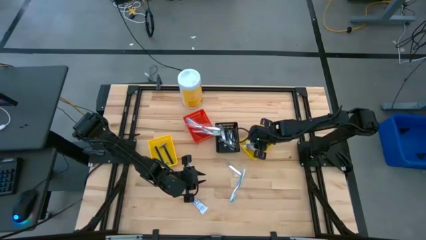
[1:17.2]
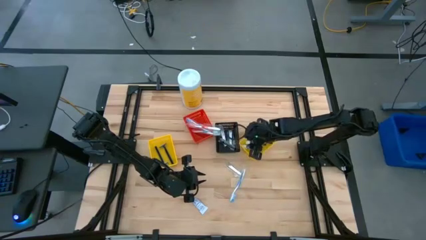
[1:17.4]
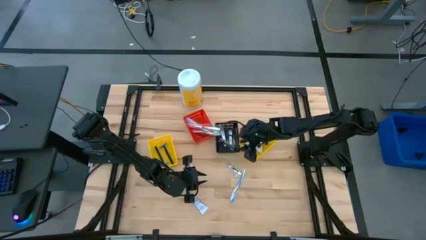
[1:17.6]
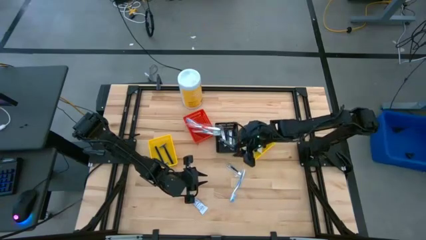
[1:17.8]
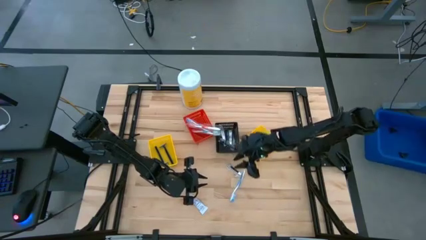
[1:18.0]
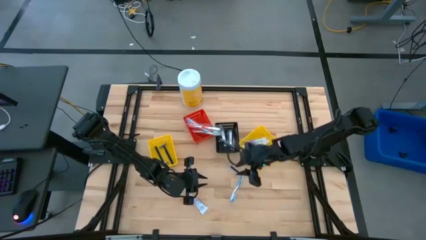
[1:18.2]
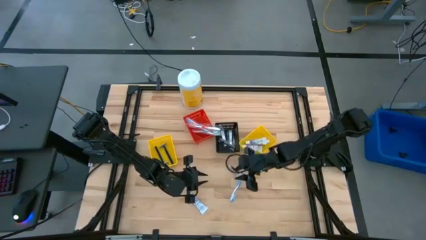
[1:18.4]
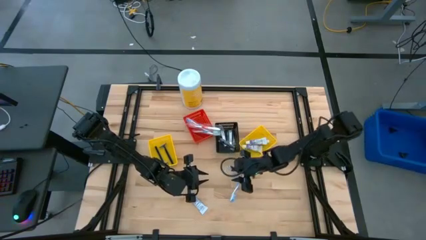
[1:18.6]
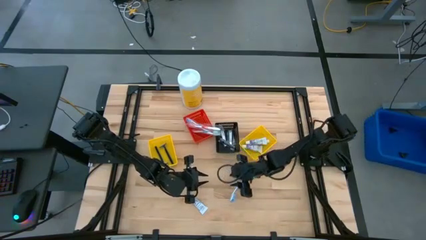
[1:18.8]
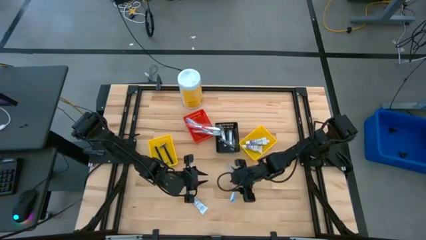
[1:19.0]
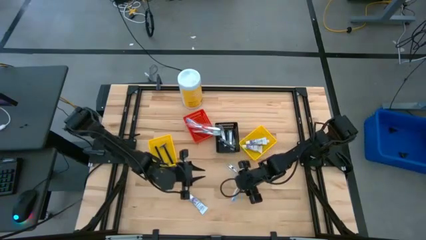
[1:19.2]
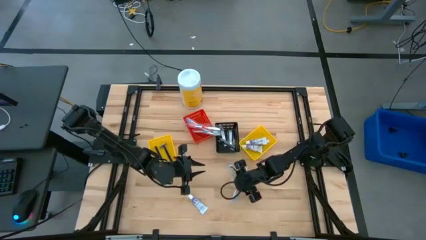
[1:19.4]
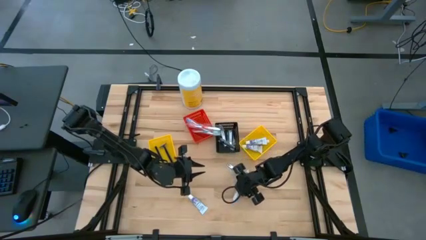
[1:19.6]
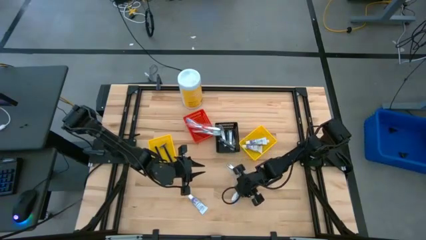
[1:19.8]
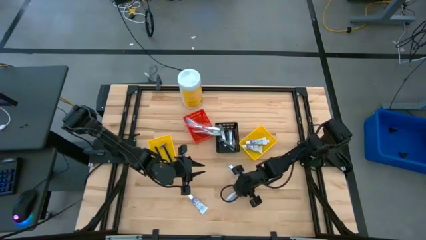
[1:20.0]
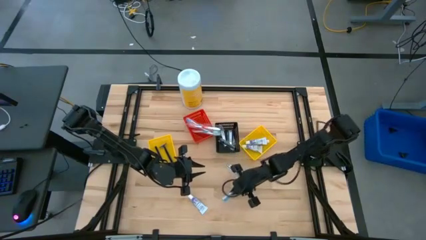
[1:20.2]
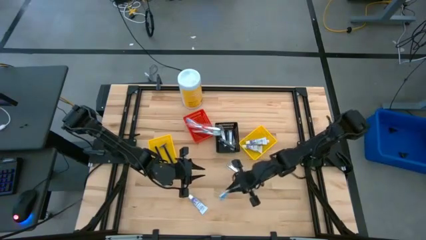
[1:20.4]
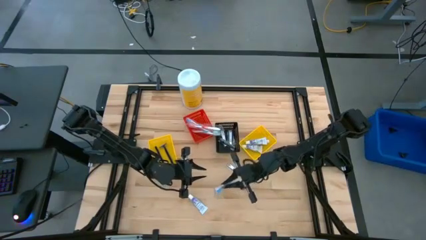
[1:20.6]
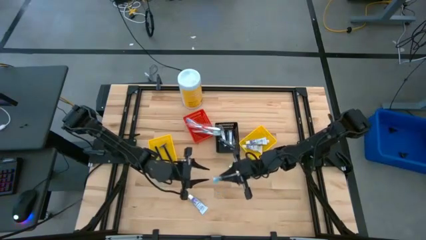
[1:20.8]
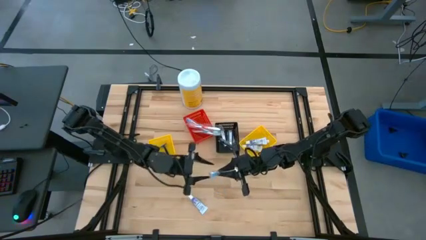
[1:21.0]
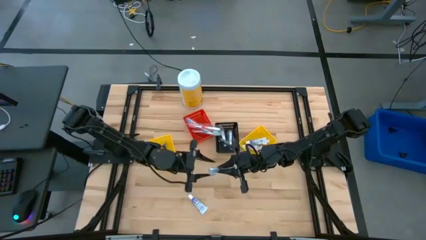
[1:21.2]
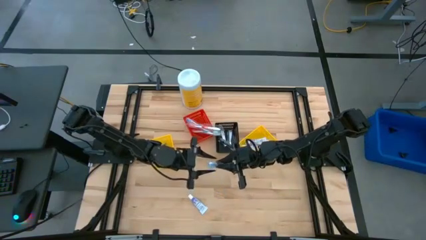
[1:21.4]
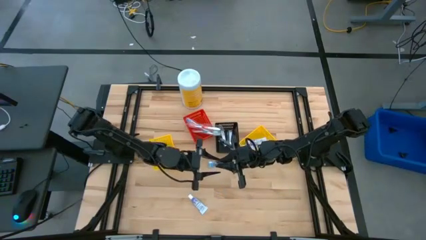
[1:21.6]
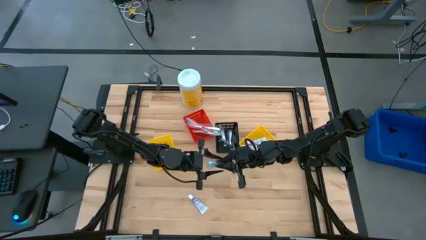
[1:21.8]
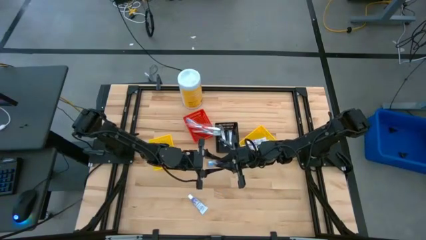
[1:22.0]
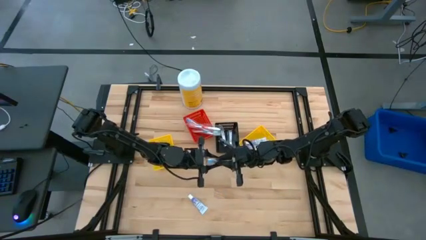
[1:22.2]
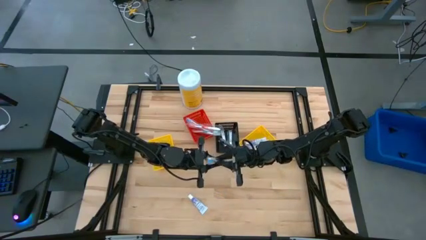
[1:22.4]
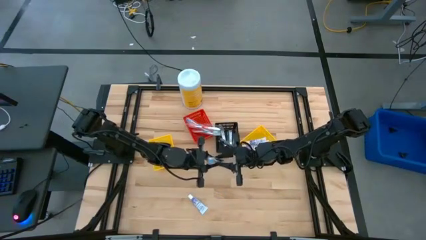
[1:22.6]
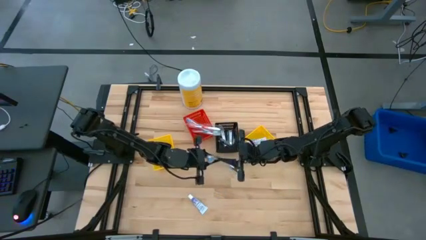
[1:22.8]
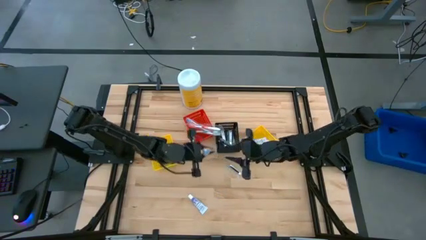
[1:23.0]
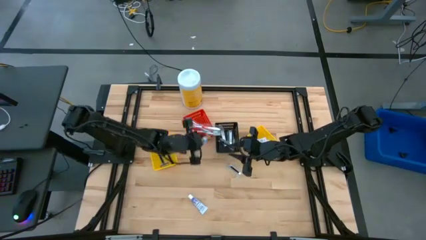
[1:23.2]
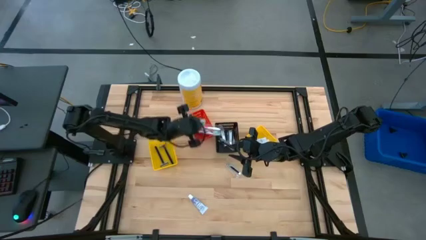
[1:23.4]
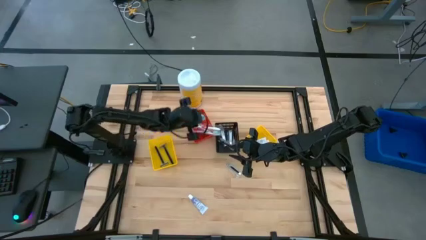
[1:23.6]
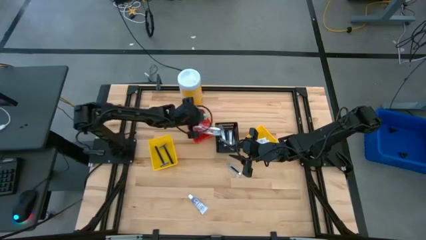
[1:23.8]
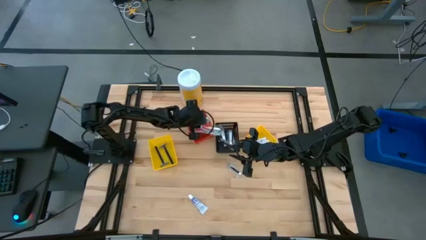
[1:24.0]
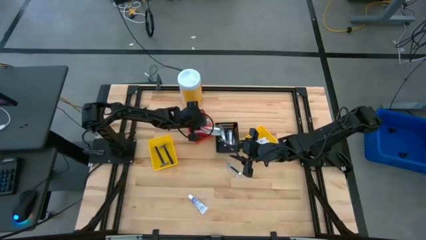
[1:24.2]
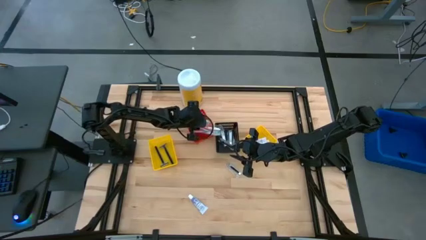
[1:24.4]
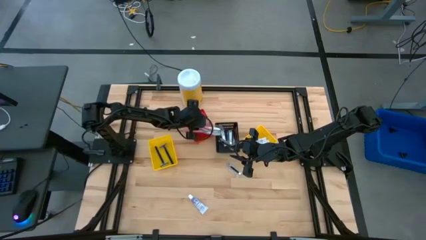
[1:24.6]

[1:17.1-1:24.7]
Task: Pick & Place Travel size toiletries
Put the blue toothbrush into the red bin

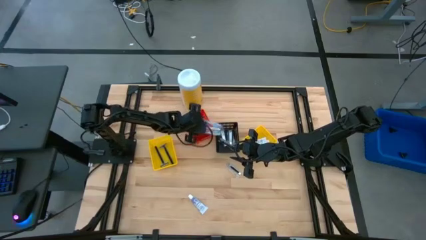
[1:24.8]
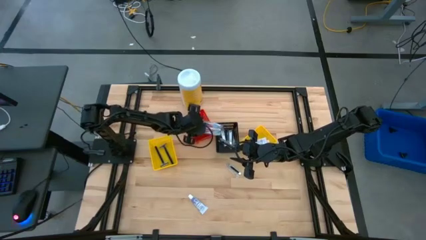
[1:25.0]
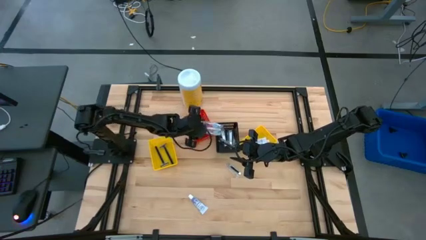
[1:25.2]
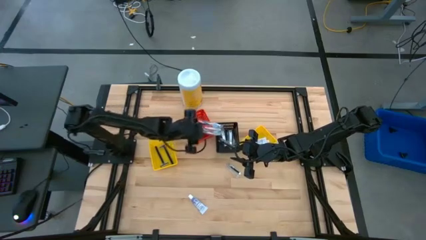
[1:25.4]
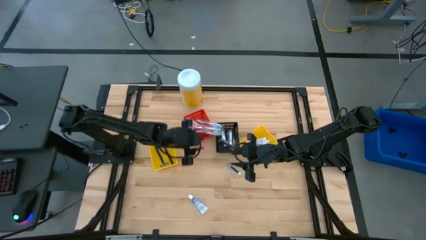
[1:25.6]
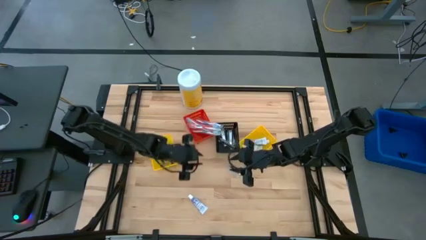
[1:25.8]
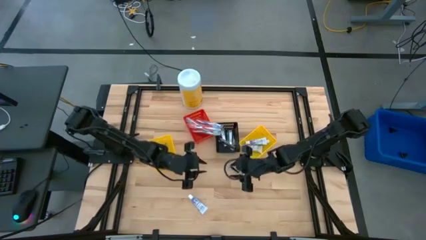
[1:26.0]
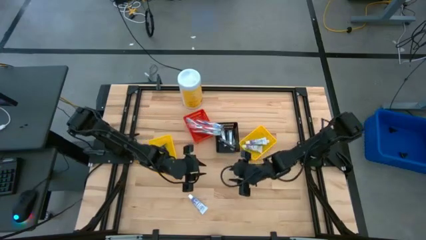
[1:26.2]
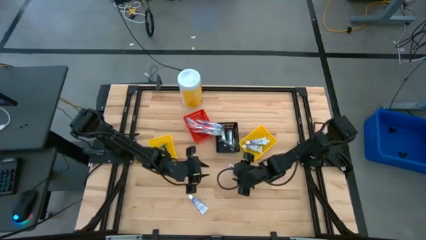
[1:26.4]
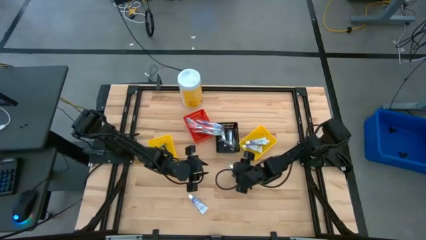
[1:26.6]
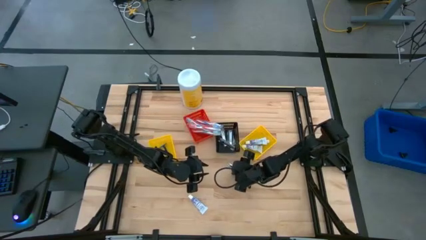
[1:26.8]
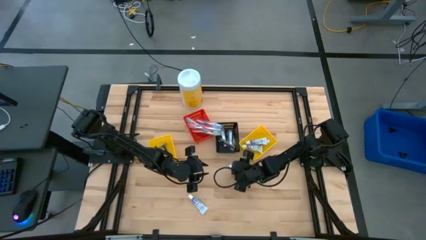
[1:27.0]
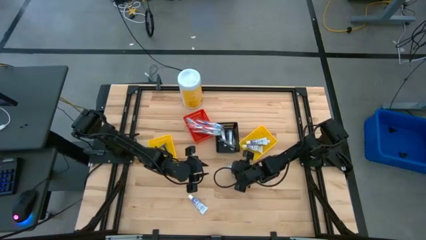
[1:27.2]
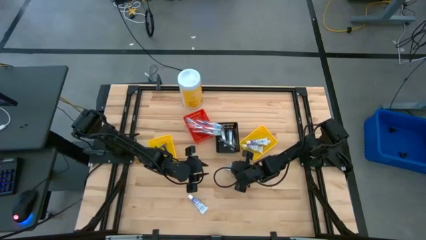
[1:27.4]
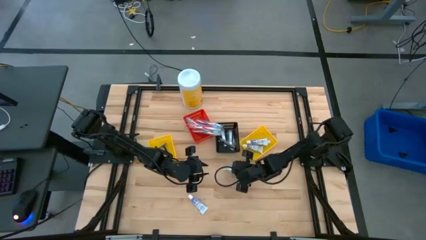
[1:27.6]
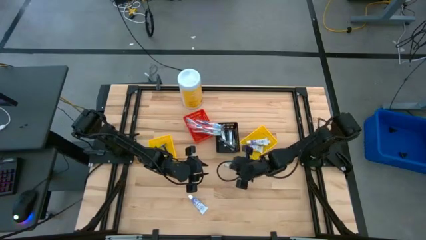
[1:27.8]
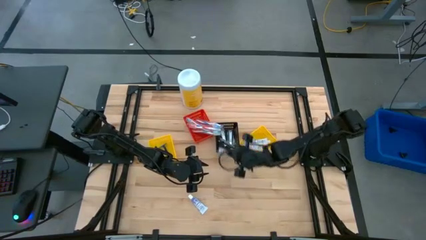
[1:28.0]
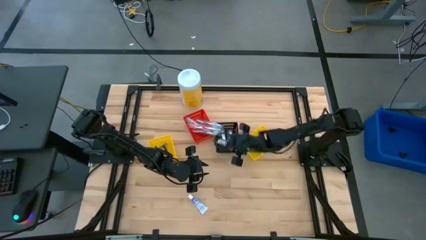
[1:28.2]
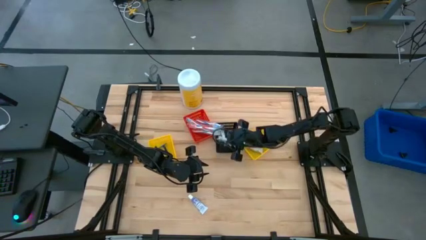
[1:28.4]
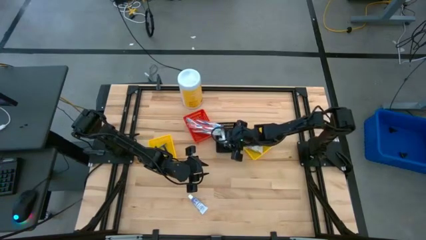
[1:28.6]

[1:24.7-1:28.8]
Put the silver nail cutter into the black bin

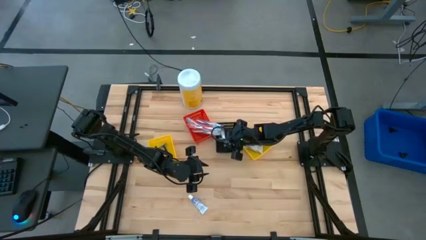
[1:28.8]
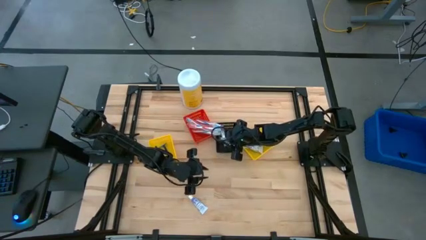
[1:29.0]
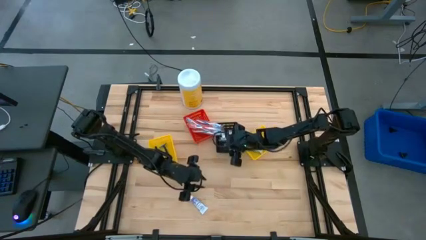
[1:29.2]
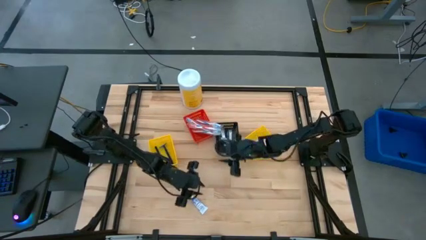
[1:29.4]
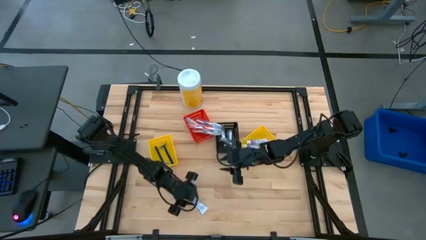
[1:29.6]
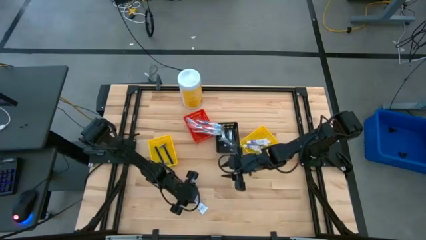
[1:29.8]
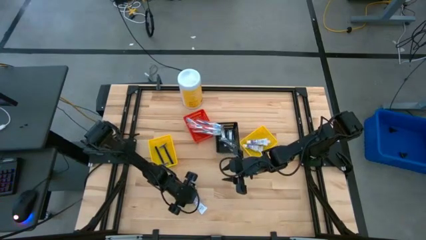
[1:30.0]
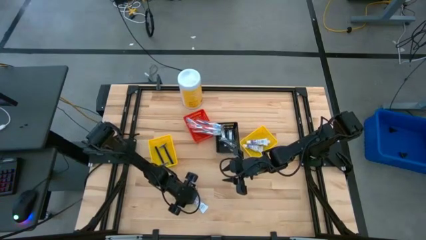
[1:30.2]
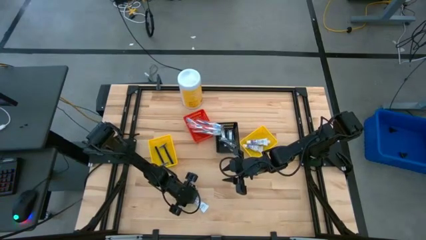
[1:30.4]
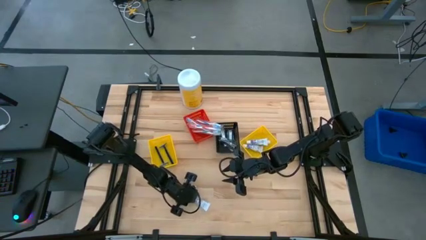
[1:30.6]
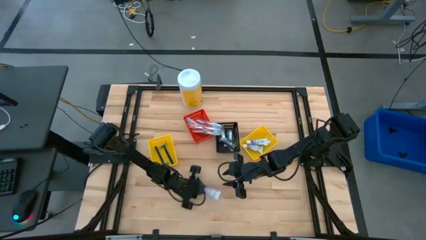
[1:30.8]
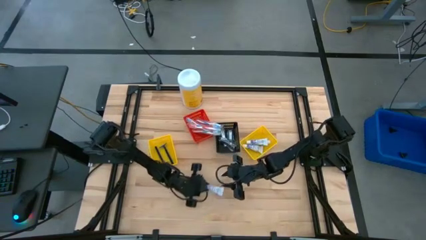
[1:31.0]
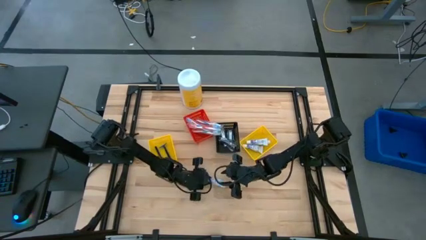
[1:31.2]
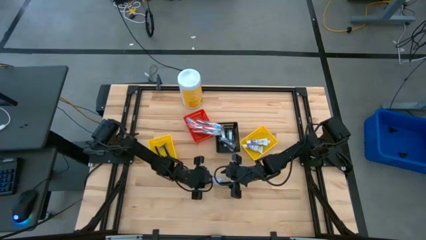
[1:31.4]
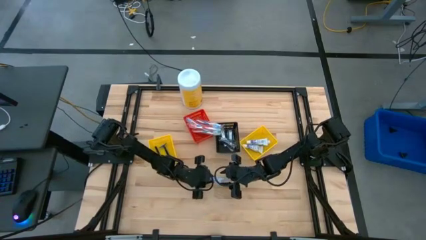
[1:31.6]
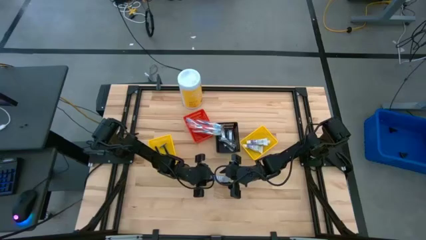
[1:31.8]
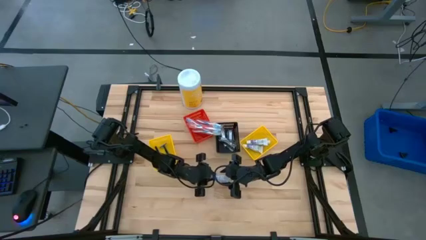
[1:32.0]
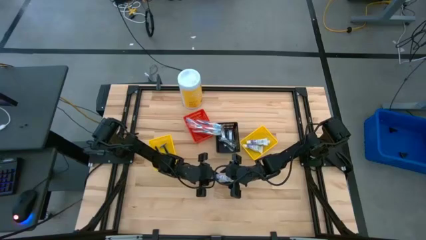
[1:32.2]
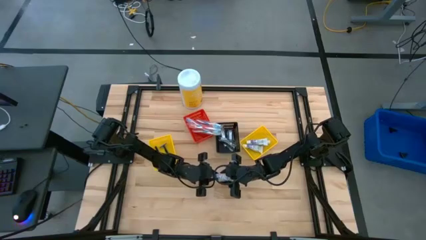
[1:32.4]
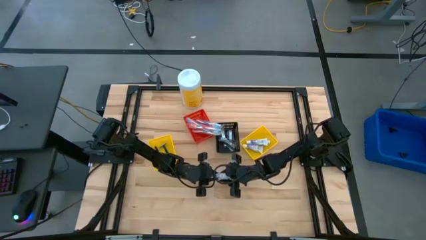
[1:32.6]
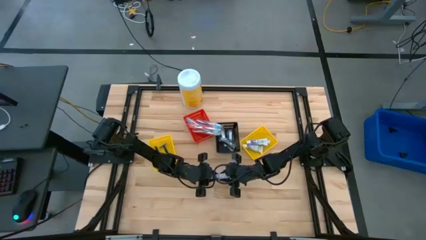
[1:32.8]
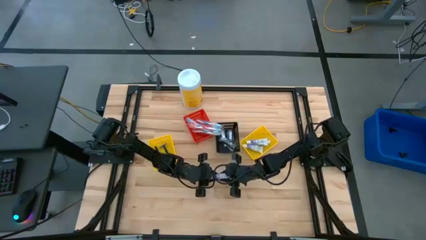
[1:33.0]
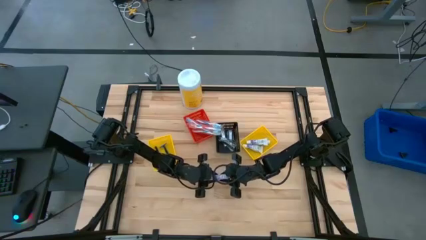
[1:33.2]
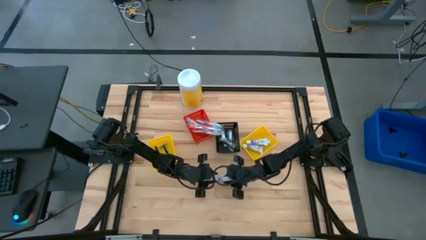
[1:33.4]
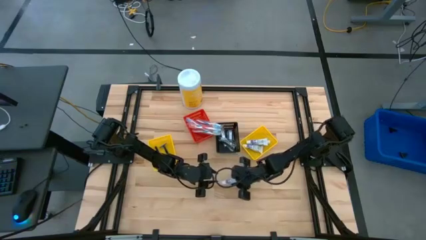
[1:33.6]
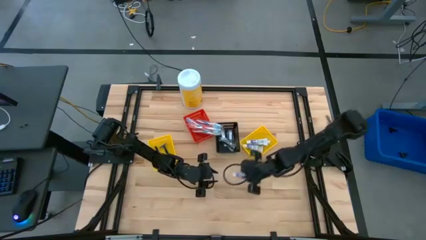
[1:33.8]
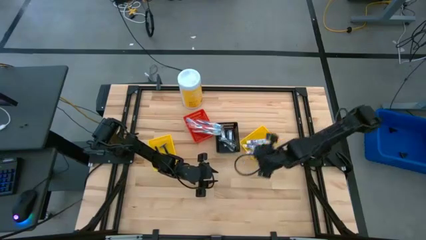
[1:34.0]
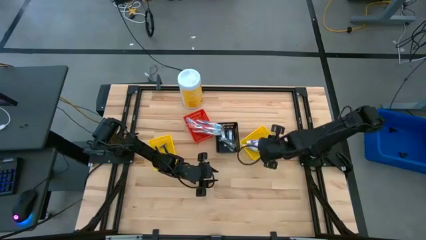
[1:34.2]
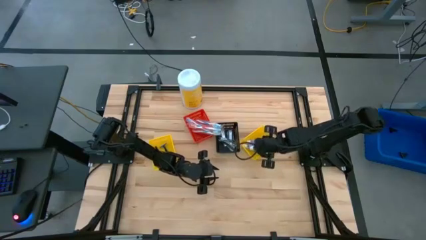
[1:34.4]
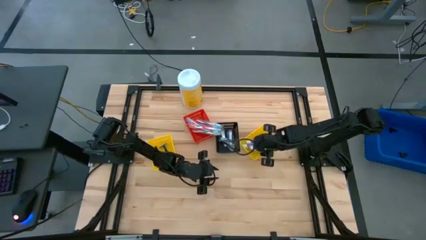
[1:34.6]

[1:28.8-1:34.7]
Put the white toothpaste into the right yellow bin
